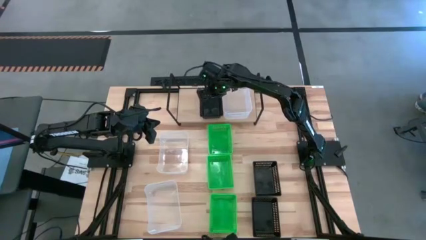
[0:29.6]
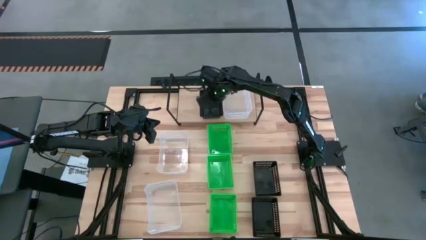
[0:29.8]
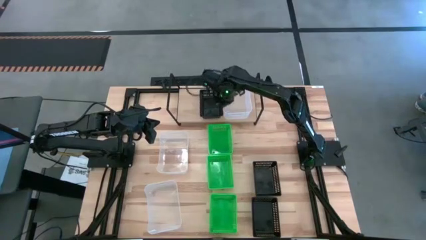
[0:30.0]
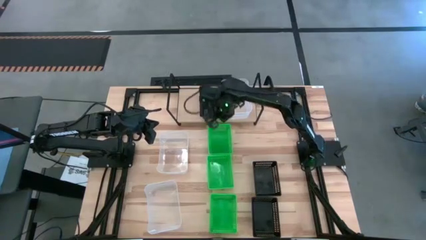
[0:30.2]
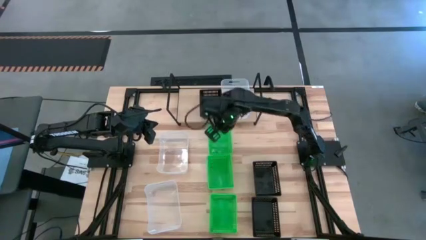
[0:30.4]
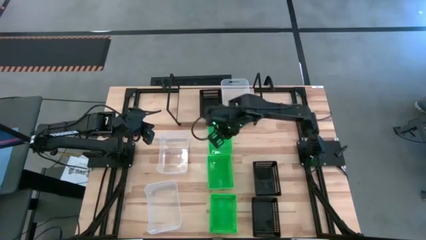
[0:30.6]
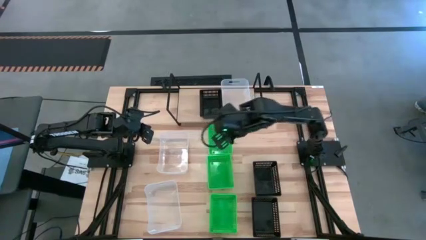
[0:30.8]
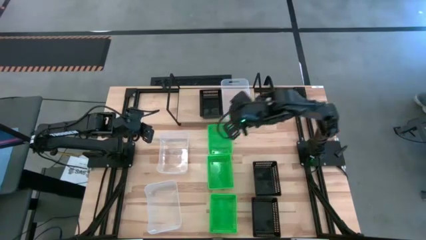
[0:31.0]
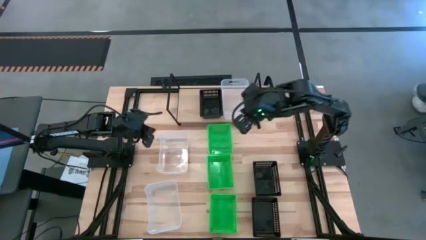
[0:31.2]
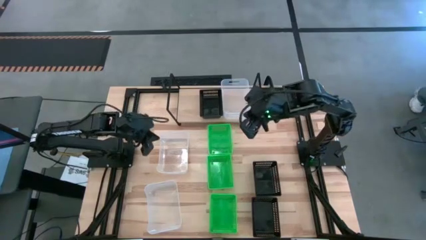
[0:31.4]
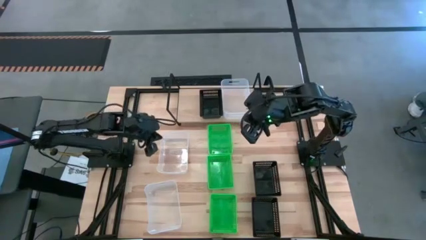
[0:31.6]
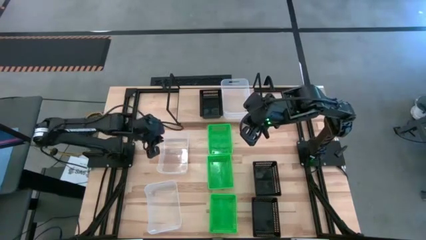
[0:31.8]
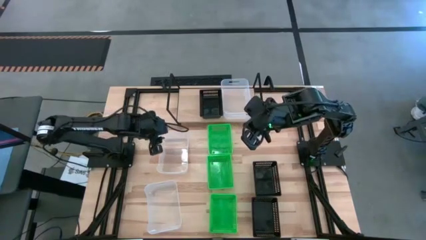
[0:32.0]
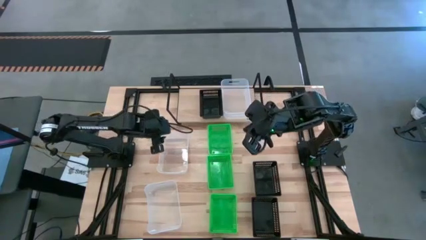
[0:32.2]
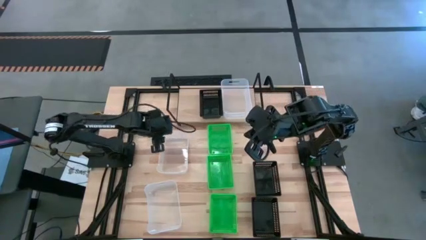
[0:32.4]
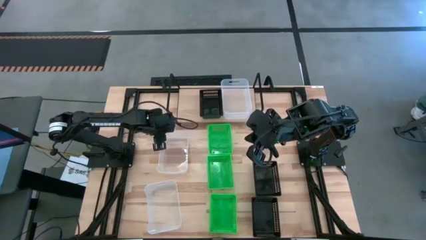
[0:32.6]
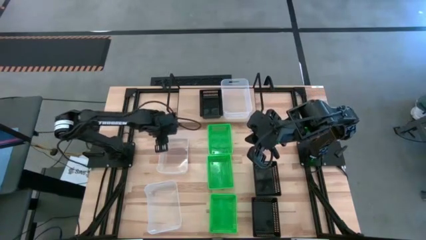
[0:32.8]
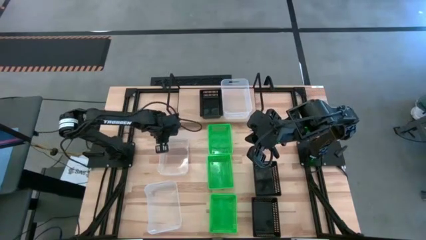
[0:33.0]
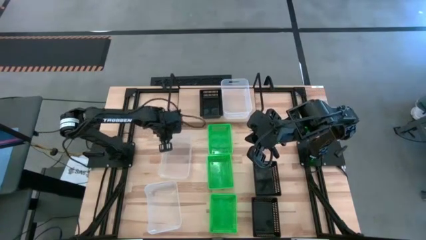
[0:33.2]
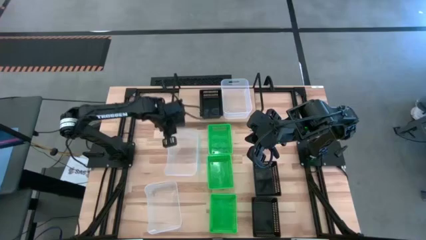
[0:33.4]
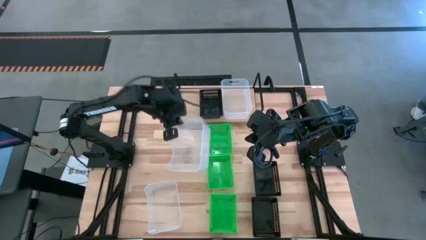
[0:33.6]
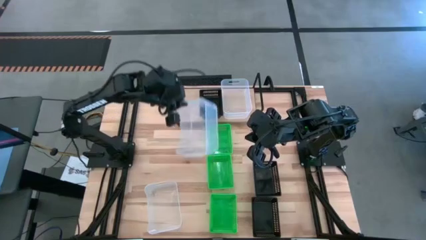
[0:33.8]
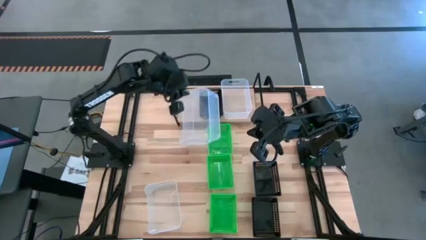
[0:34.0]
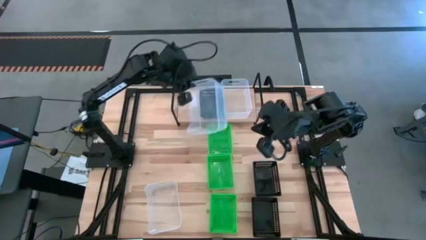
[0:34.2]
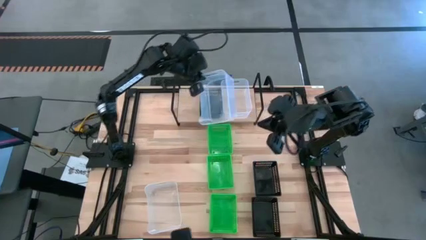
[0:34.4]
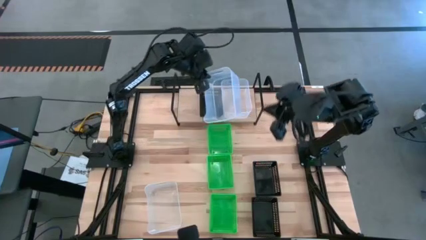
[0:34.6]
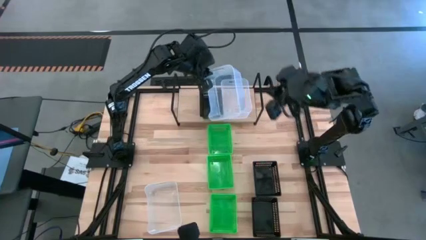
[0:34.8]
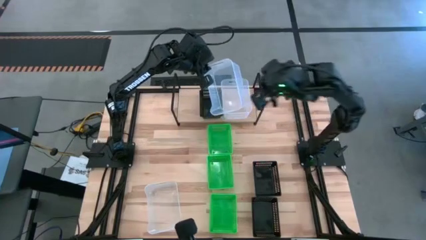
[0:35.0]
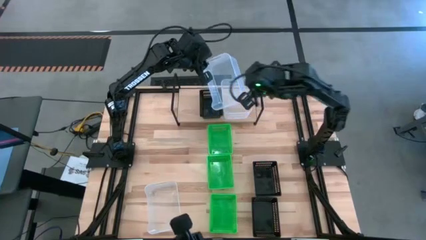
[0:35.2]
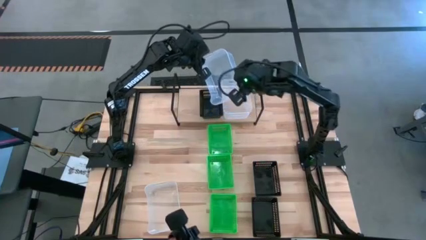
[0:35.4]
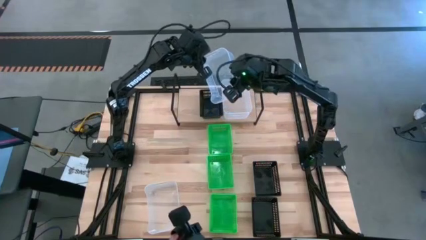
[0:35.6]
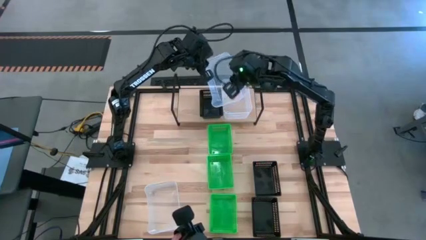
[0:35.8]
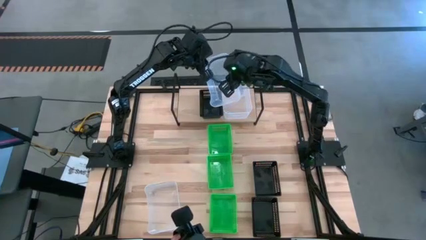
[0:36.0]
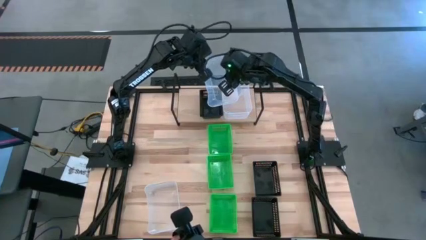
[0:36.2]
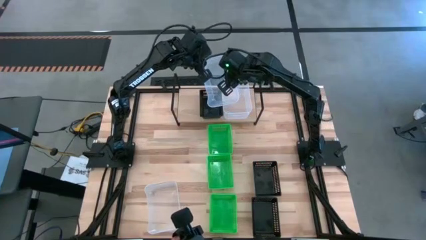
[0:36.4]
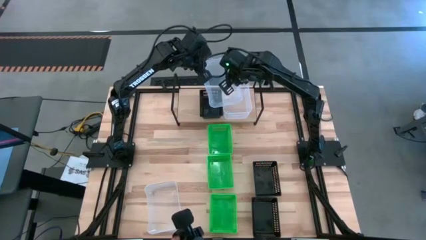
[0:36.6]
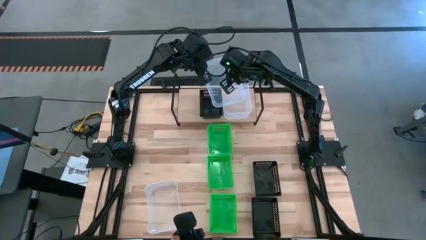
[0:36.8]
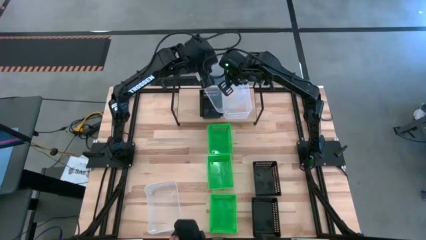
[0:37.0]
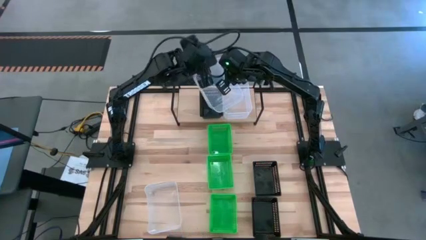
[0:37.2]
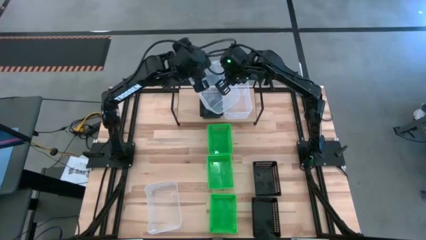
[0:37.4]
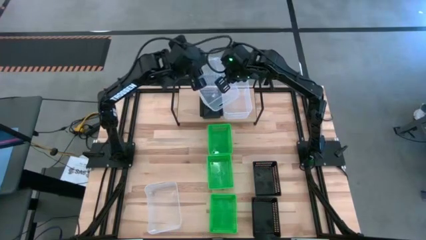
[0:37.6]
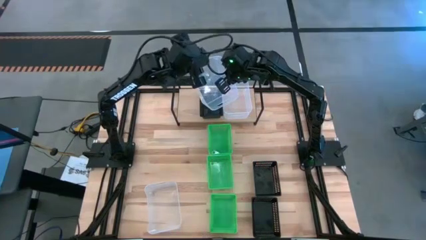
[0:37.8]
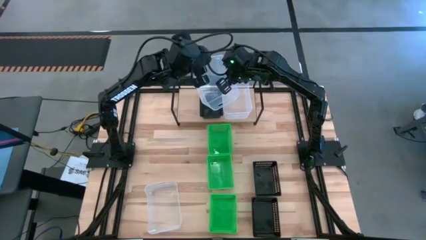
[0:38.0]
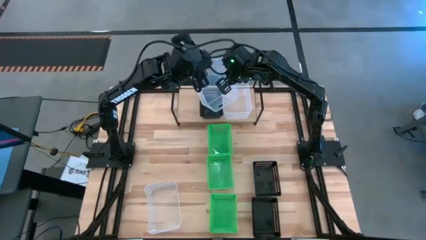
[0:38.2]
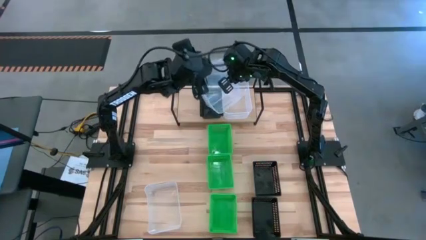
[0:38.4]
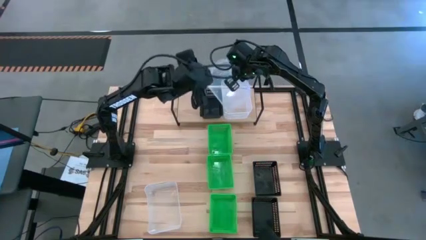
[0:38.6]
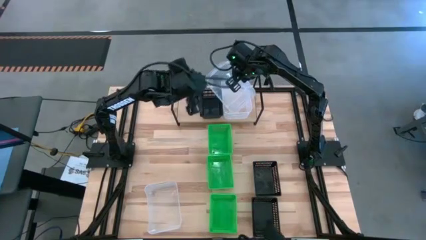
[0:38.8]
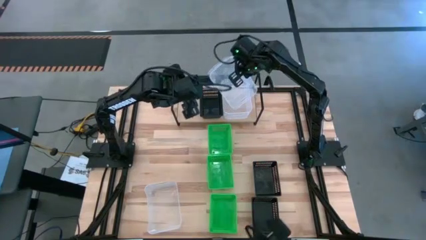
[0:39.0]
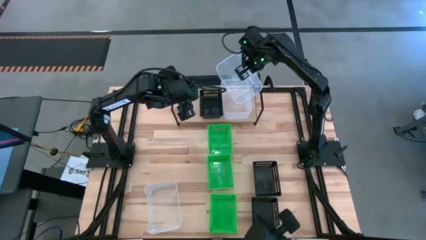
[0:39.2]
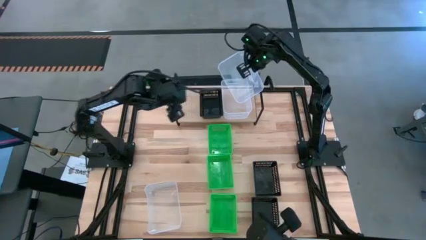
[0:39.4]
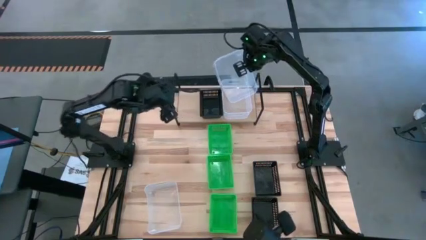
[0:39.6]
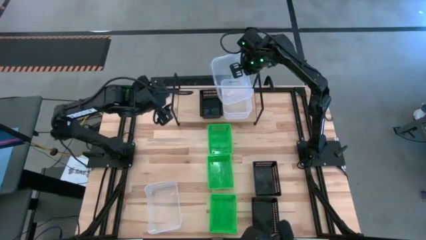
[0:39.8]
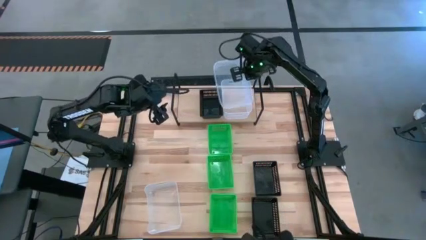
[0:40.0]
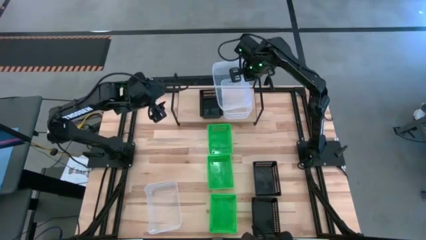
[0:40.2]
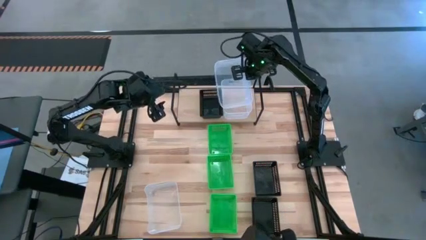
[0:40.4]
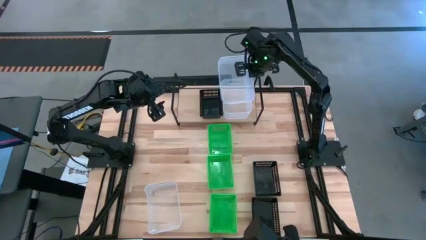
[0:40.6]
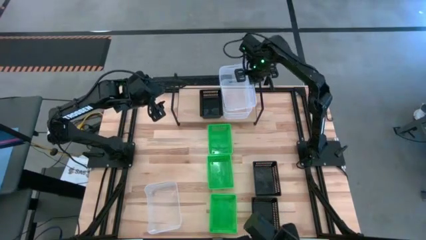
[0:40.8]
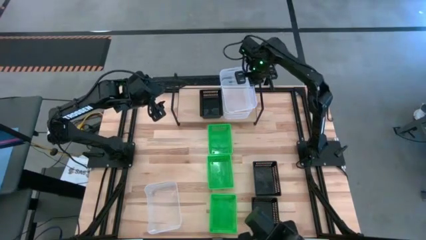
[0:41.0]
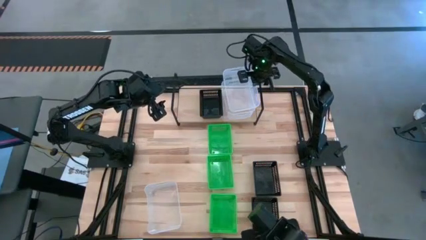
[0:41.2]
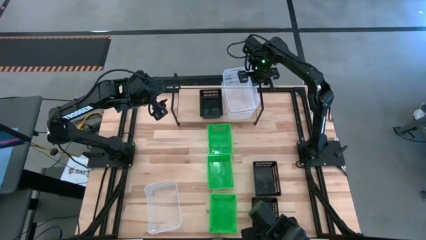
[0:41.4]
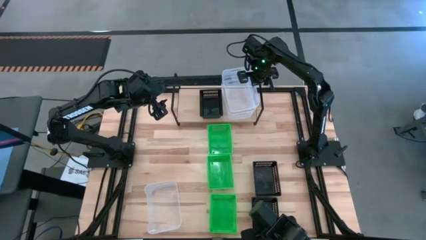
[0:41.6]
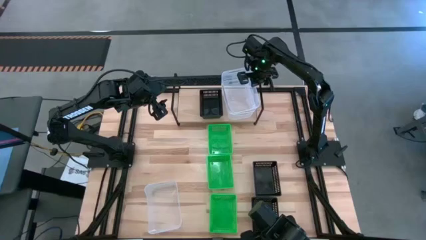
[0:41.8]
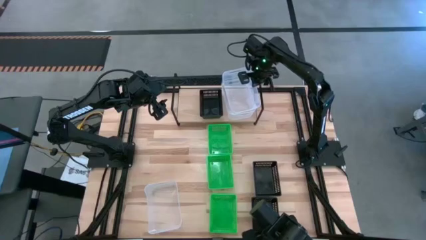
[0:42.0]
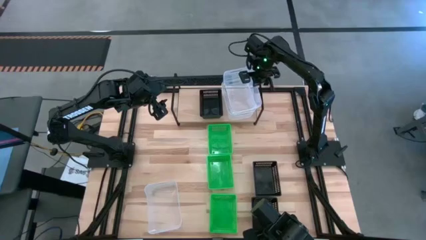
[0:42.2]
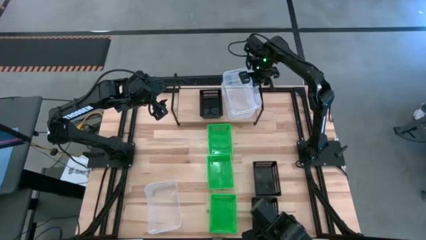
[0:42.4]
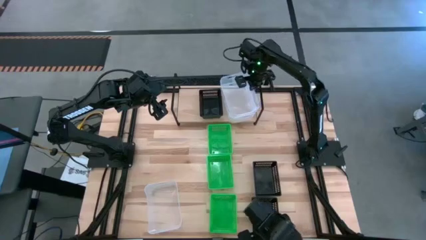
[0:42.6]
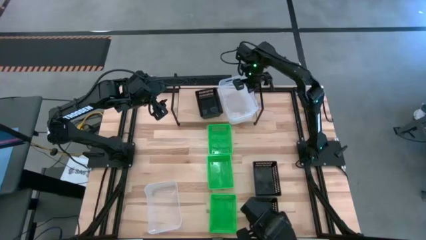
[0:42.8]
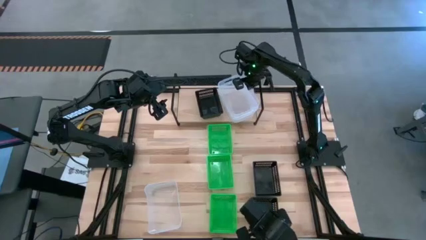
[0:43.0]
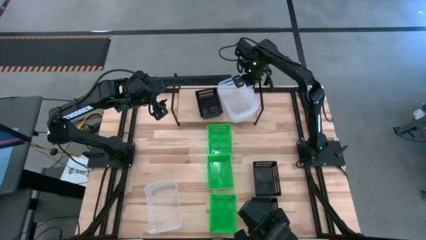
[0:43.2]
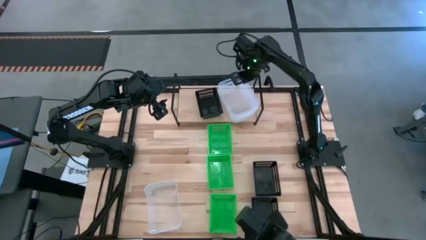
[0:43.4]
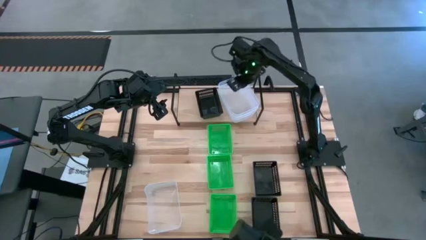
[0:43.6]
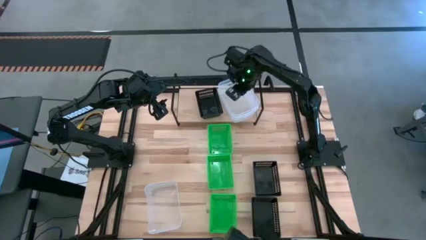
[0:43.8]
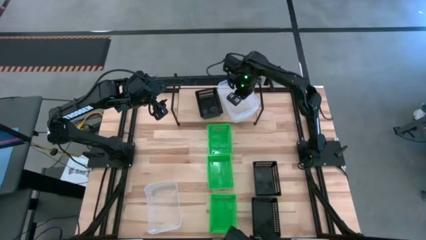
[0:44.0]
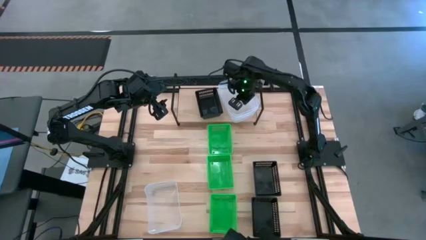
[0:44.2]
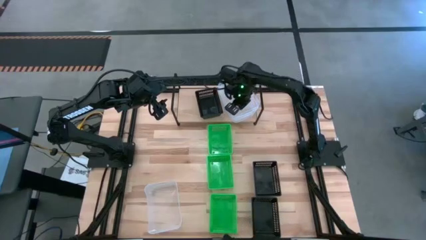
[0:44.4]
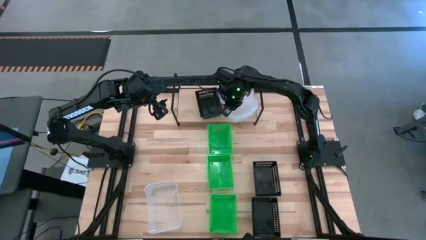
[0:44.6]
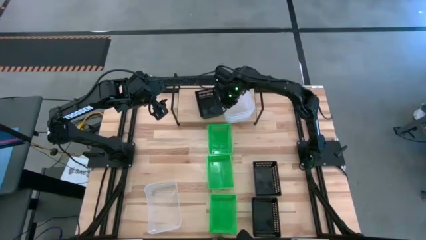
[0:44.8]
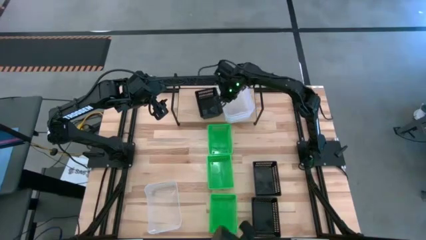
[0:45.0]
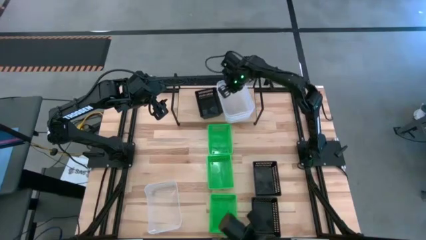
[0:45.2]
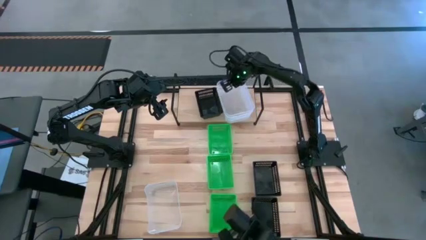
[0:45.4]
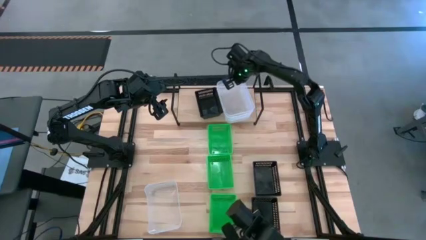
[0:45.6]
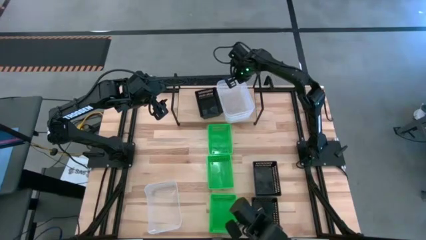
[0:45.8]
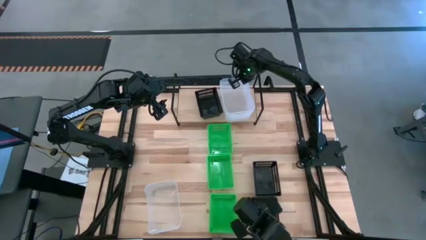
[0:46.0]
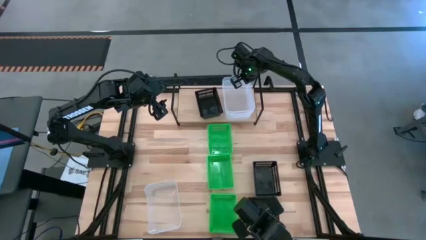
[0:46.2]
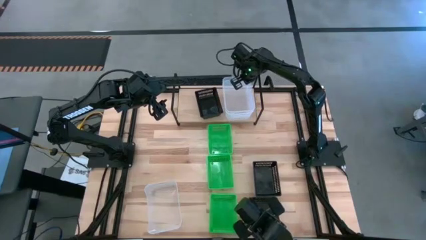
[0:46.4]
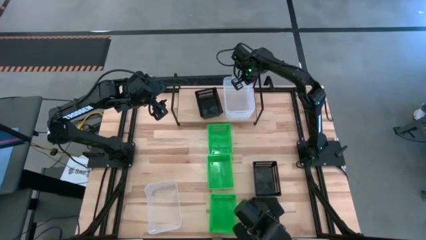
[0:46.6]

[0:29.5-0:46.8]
Task: Stack baskets on shelf by color
Stack the top transparent bin into the transparent bin on the shelf

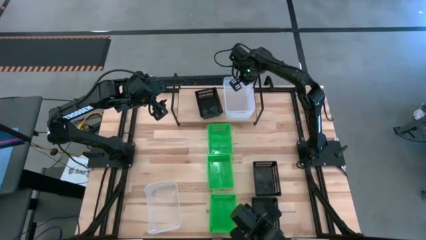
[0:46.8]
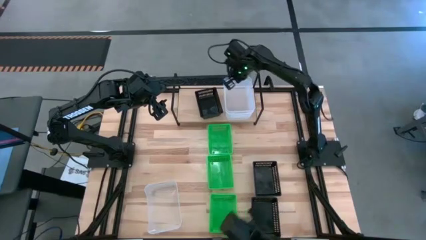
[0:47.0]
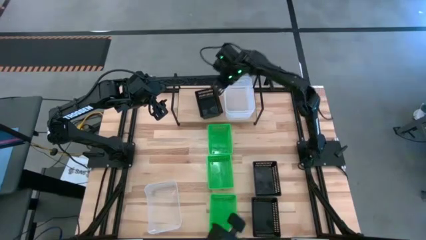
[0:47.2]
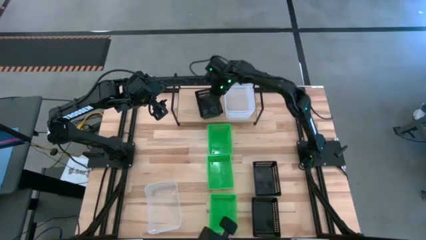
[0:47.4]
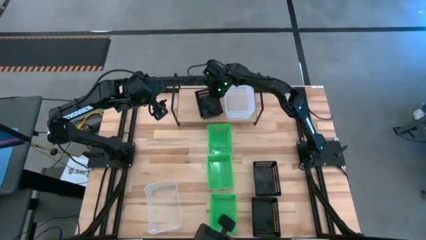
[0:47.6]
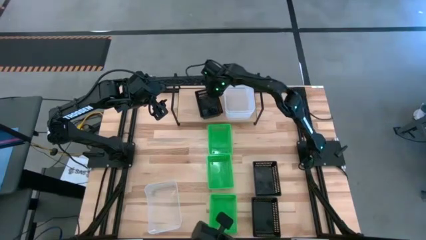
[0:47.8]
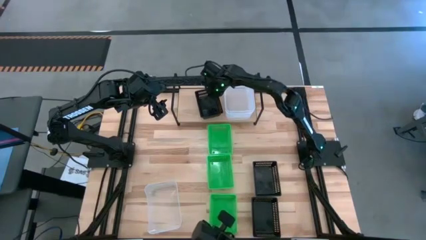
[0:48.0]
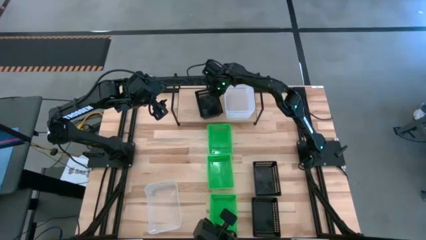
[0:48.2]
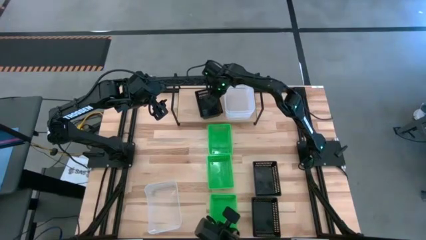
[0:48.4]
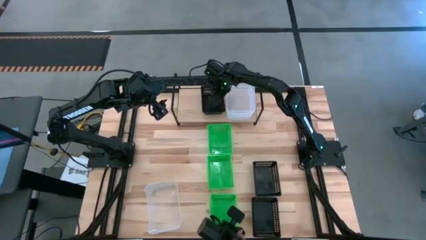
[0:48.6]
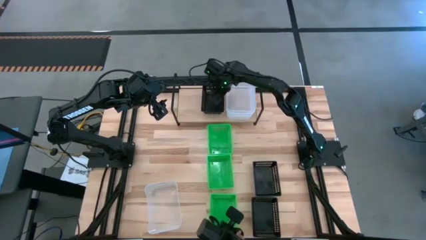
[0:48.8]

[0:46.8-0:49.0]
Adjust the black bin on the shelf
